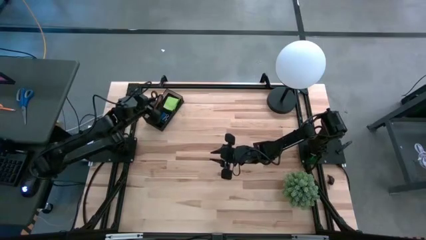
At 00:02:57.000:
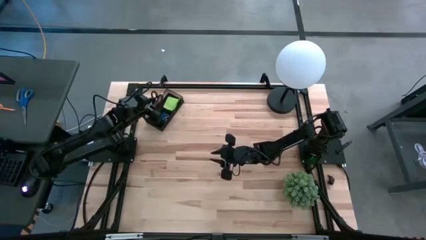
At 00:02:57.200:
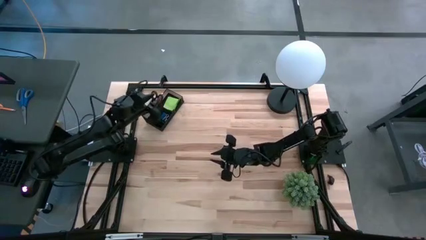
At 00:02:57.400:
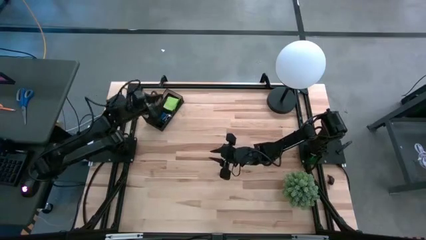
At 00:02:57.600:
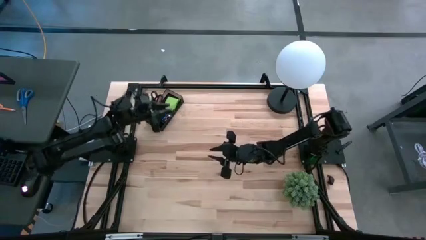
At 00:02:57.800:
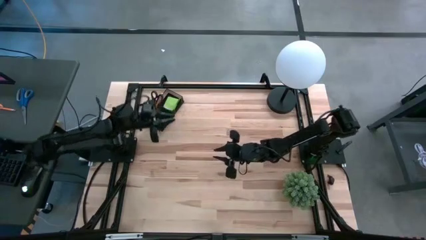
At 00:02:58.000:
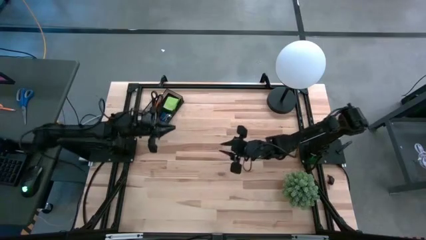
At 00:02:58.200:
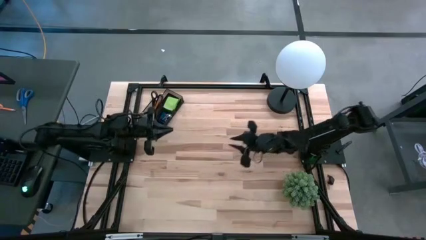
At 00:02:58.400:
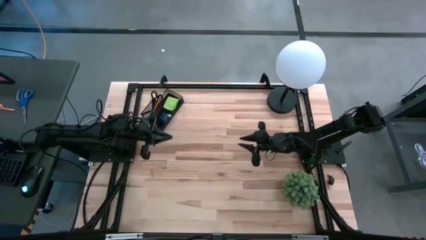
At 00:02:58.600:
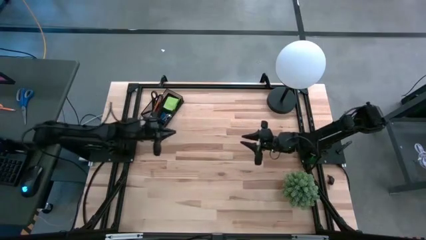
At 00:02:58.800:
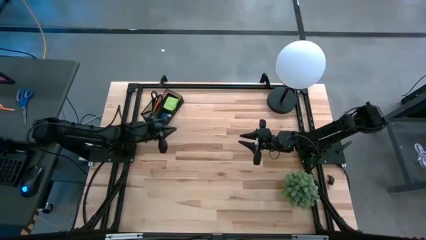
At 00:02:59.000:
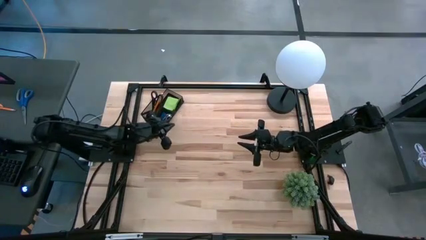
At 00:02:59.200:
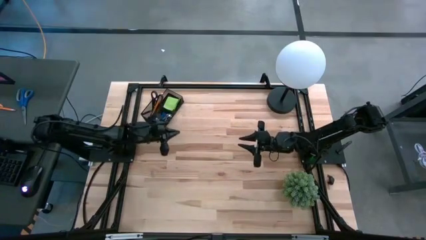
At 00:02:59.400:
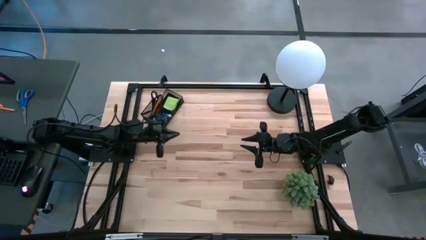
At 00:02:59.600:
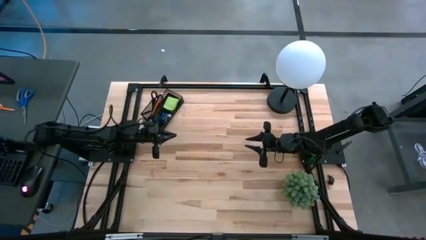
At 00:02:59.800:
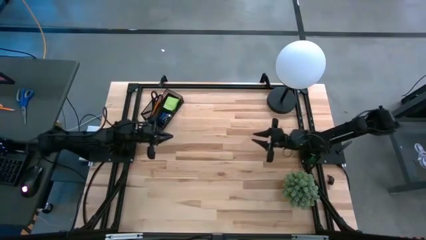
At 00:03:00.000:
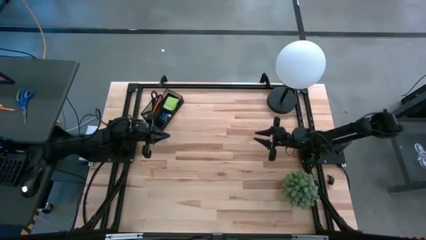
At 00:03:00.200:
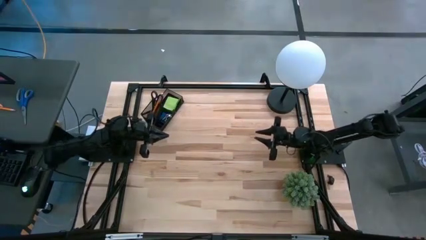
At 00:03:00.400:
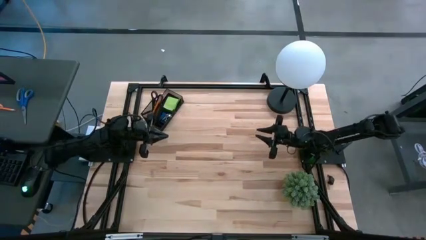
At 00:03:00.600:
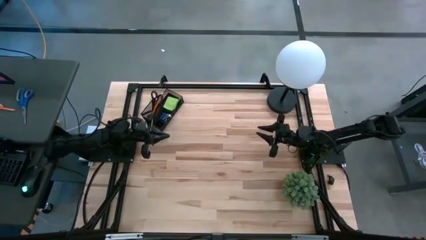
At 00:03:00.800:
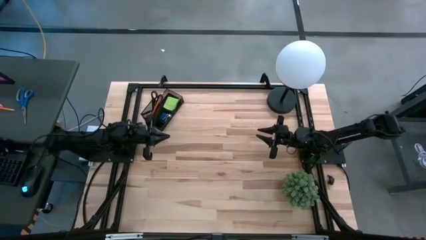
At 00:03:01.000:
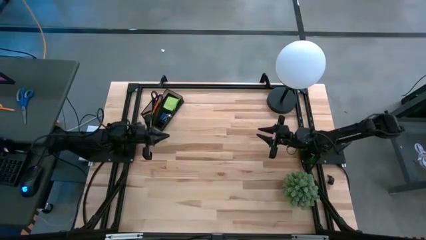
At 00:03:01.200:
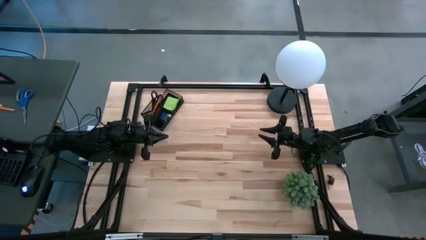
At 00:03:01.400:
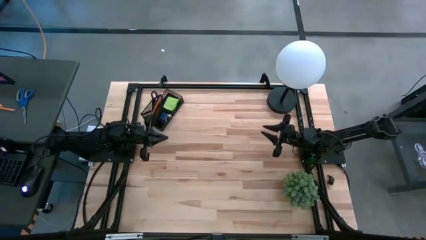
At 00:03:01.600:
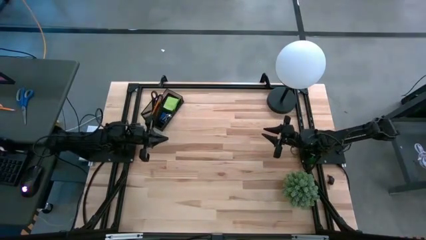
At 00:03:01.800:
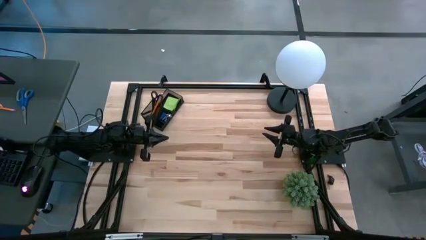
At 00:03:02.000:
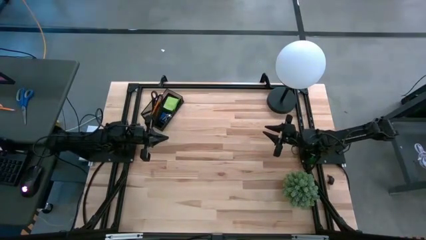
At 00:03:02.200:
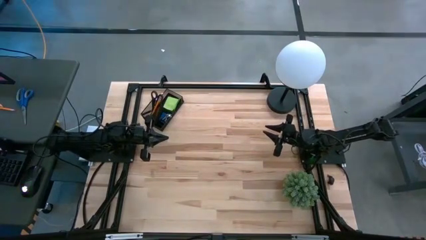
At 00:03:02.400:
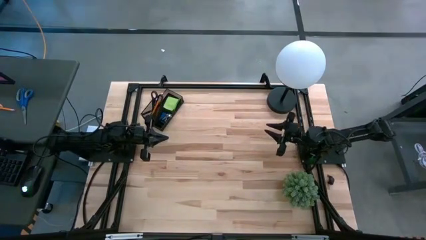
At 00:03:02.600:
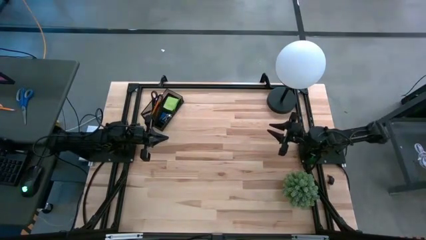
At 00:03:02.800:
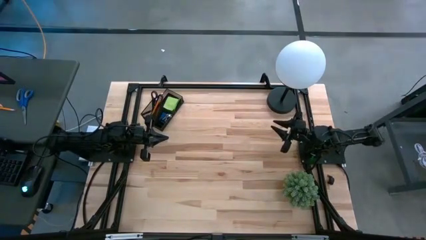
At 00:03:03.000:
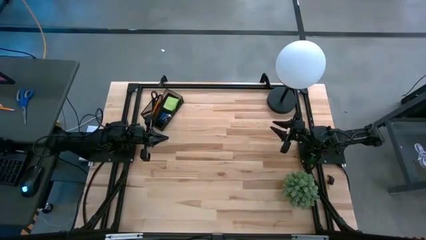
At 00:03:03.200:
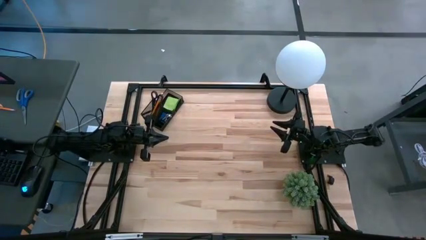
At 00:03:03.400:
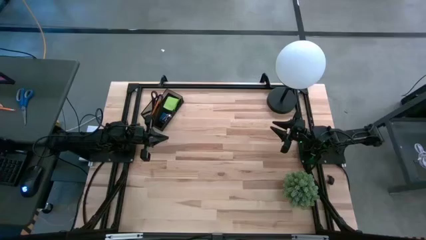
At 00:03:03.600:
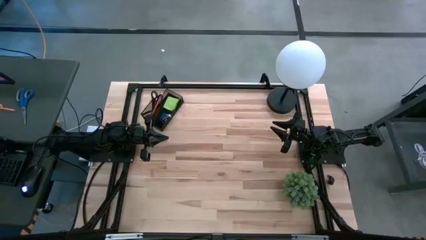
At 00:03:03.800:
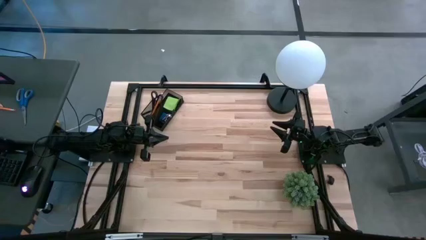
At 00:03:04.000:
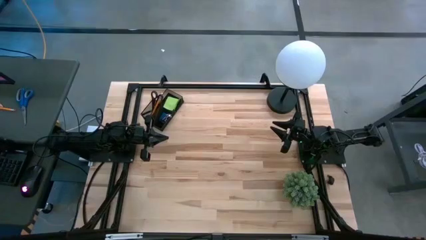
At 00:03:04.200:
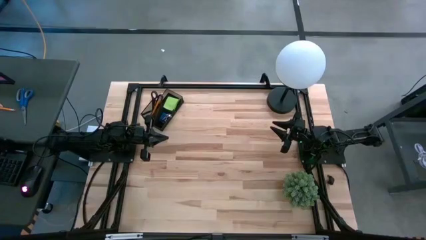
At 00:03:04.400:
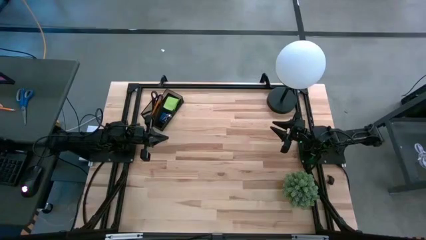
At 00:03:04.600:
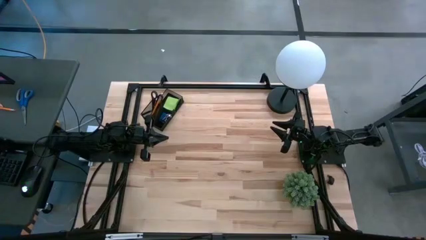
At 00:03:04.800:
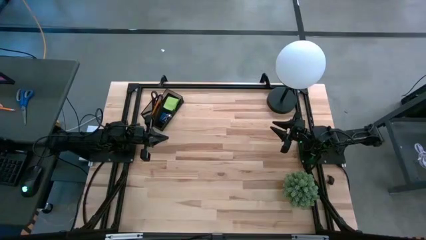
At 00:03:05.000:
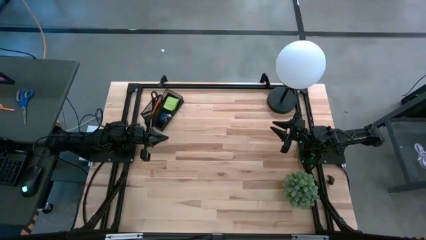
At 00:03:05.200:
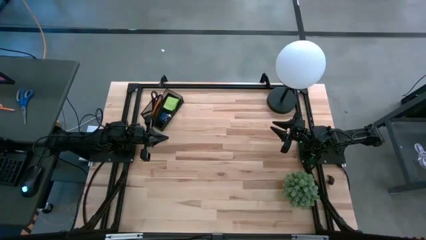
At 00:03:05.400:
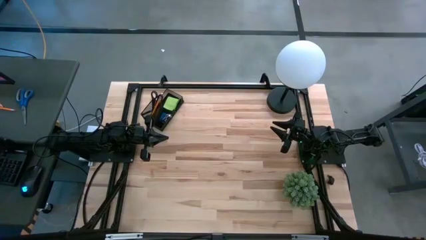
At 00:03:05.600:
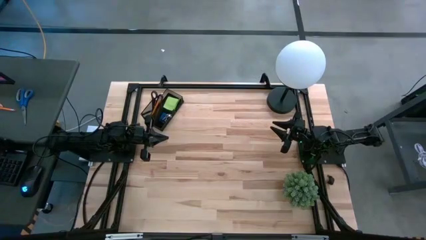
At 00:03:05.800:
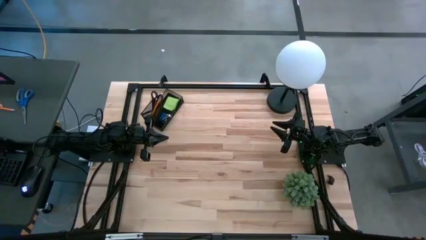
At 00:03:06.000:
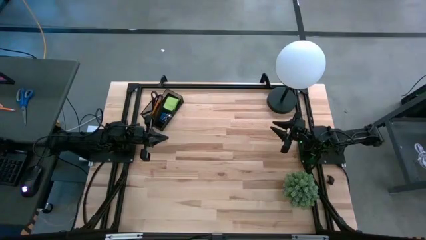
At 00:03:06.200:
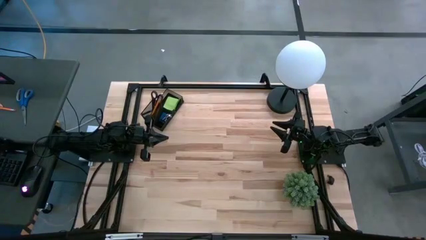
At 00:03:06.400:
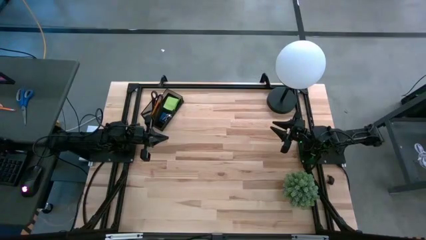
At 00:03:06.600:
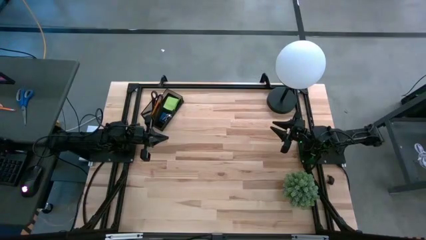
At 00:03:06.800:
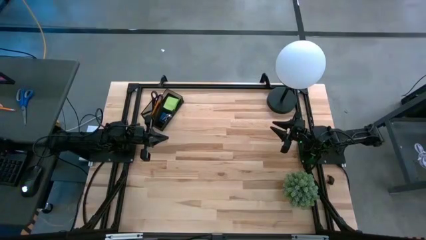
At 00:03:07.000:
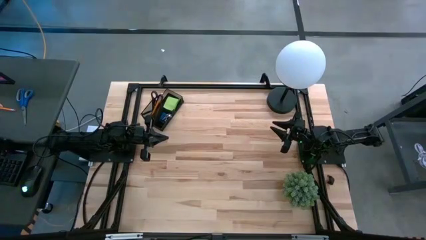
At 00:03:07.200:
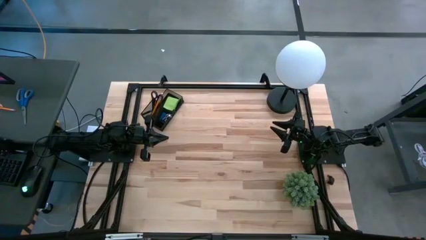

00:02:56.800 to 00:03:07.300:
Task: Pick and place office supplies into organizer
Return to Home Position
